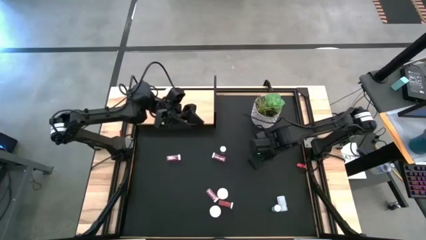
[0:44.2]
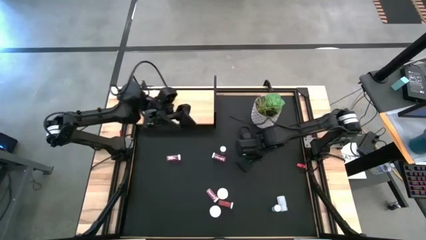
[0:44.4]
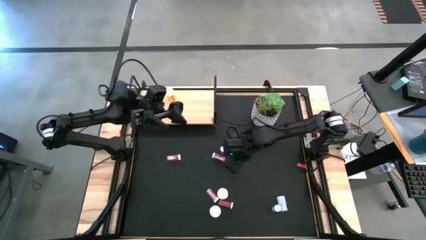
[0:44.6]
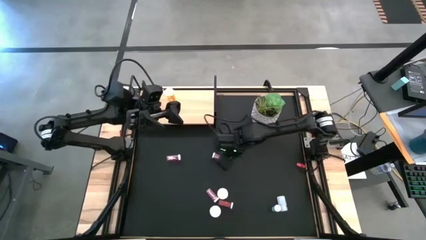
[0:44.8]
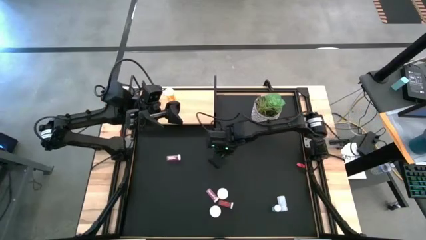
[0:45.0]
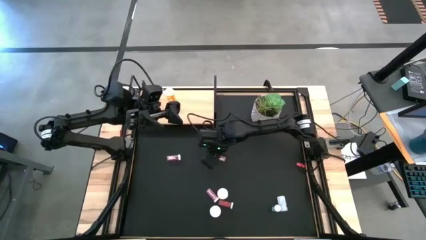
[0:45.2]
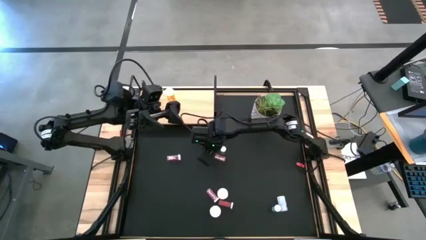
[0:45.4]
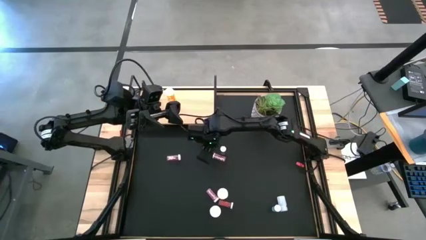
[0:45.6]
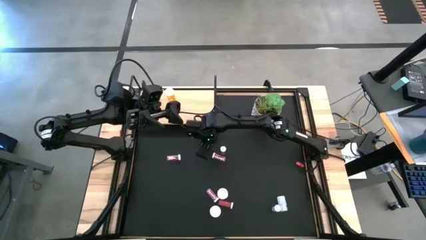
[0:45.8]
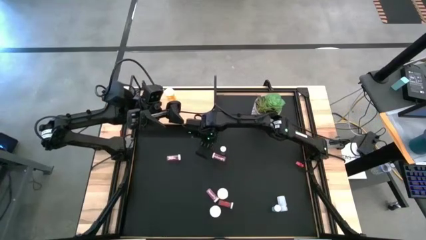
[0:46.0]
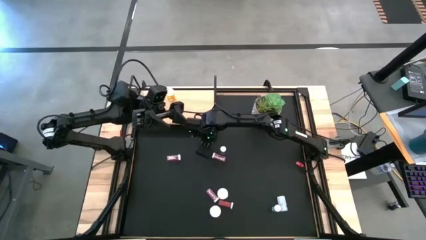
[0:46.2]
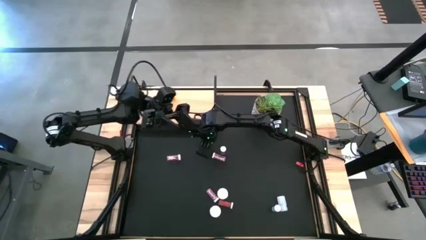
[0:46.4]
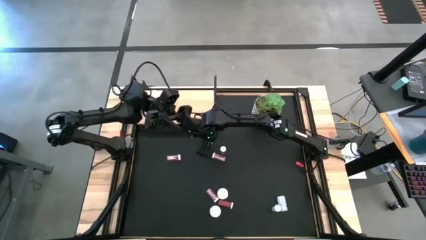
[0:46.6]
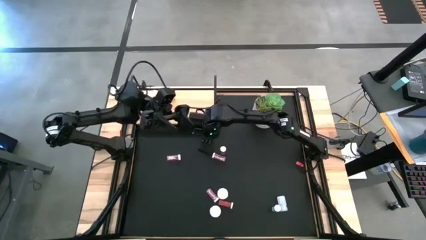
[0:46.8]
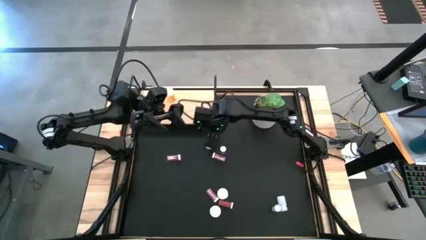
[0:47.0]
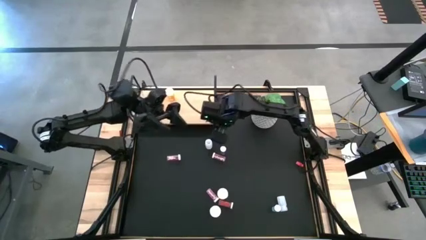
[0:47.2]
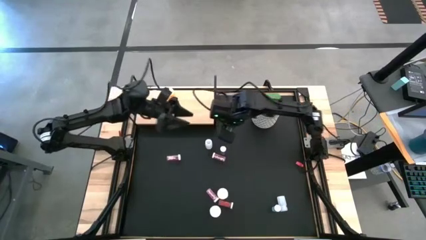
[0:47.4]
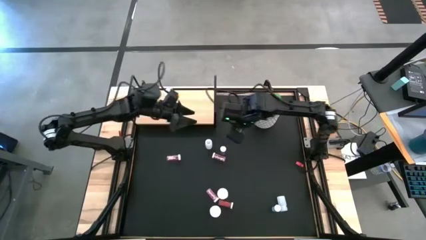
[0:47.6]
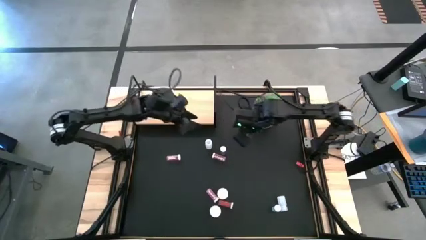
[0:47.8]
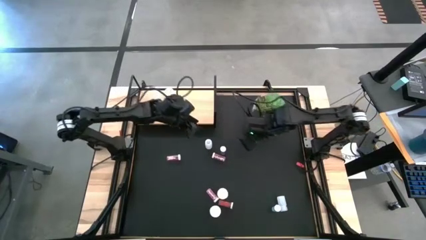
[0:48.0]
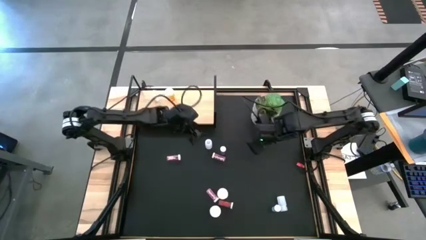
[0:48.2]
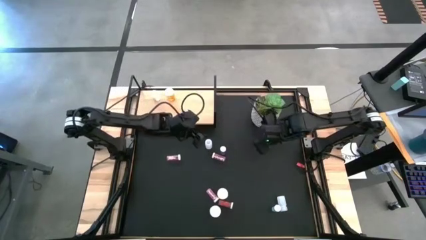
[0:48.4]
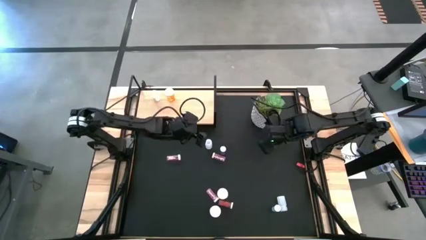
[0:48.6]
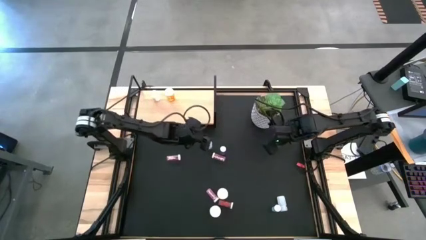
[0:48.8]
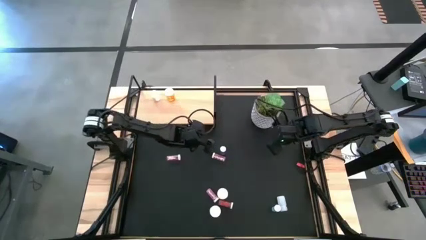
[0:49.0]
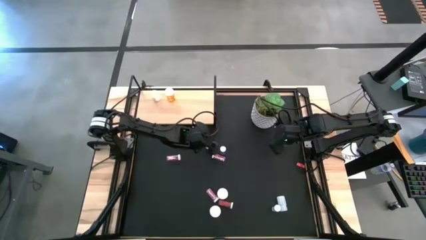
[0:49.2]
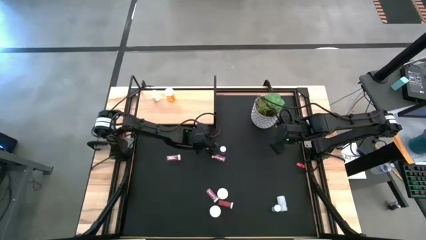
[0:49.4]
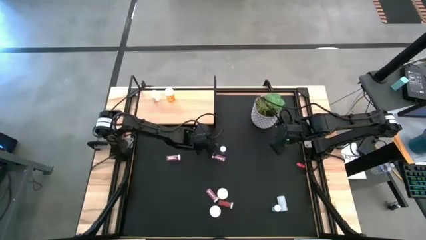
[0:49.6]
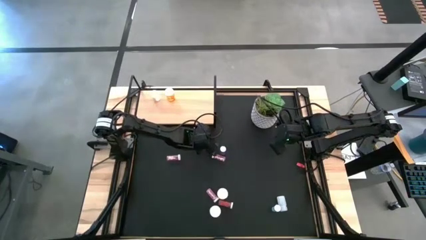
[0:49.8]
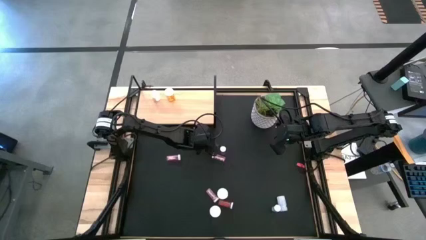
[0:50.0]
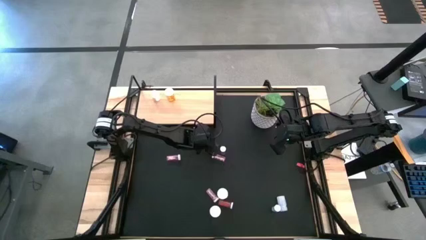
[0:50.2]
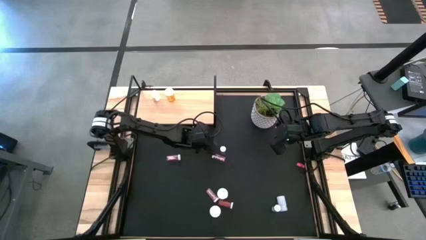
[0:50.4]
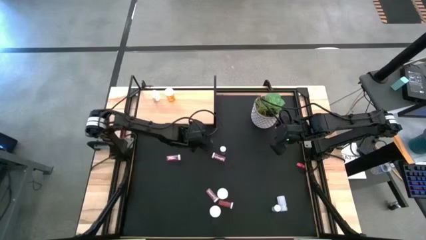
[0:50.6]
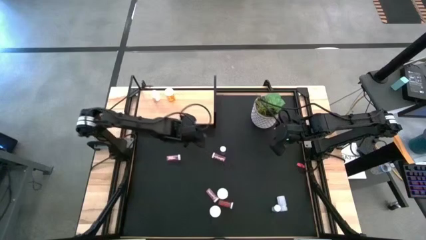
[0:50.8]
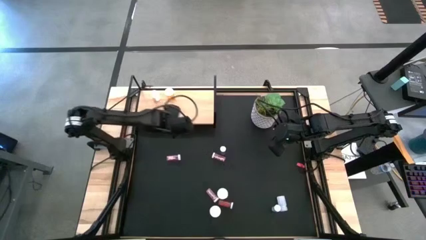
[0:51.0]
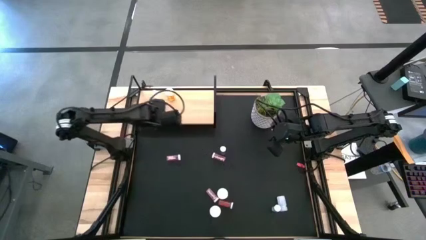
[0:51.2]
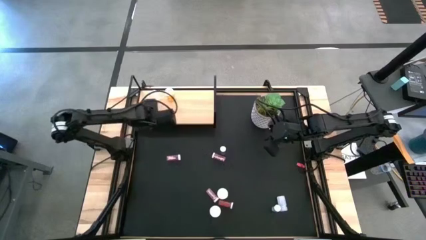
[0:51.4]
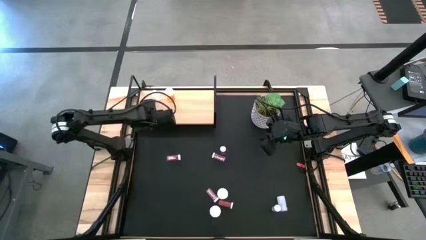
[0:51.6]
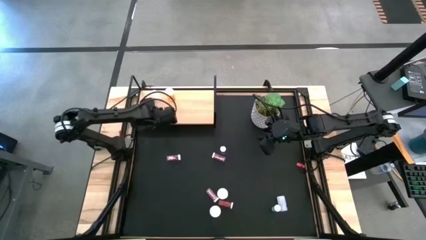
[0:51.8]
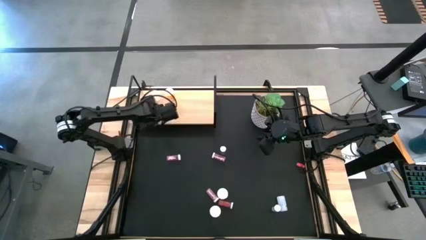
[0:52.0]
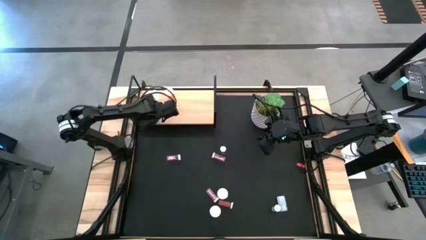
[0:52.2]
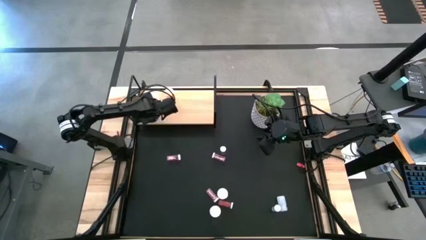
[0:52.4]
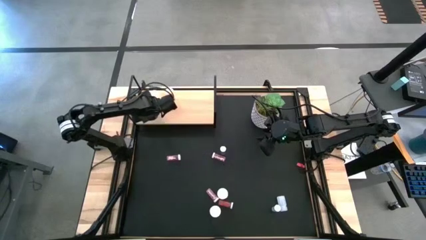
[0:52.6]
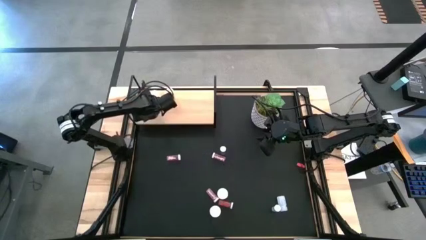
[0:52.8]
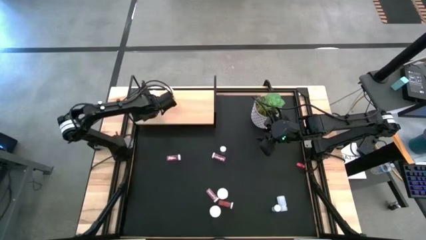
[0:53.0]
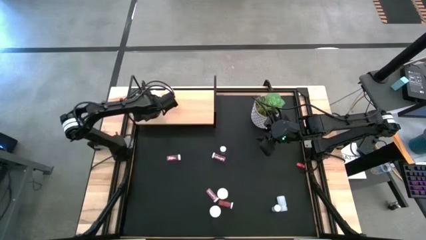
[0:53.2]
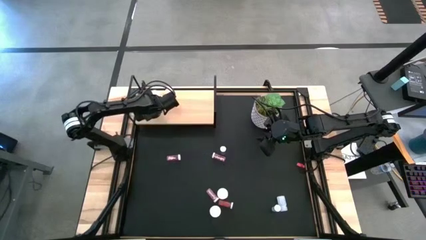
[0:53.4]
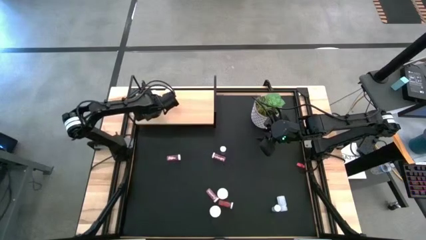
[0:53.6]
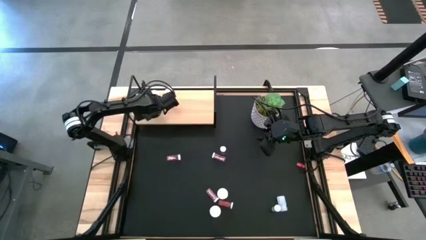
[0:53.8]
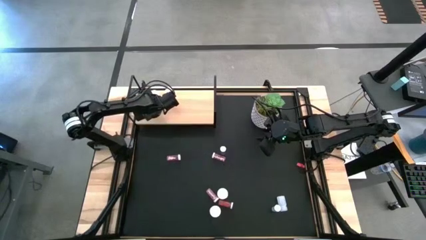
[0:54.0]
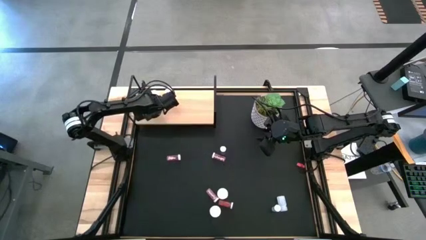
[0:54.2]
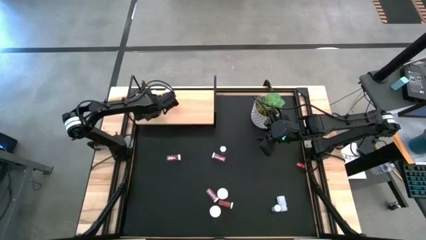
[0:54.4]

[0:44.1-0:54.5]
Task: Pick and place medicine bottles onto shelf by color
Put the top white pill bottle on the shelf aligned with the other white pill bottle

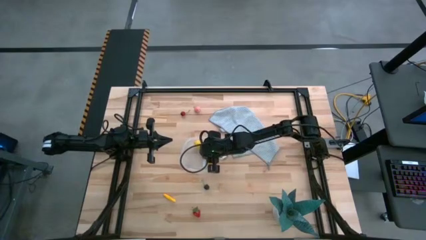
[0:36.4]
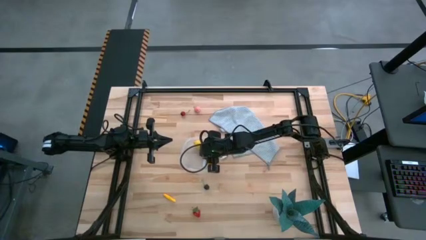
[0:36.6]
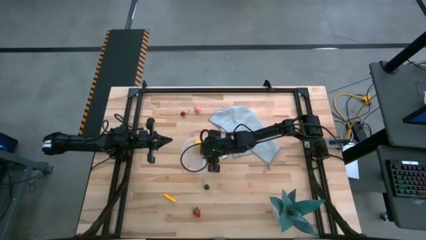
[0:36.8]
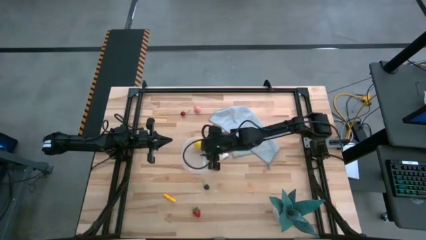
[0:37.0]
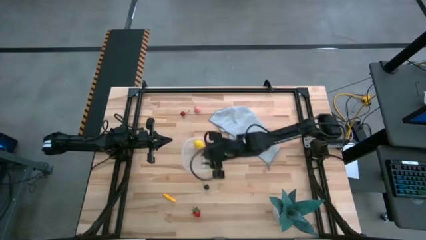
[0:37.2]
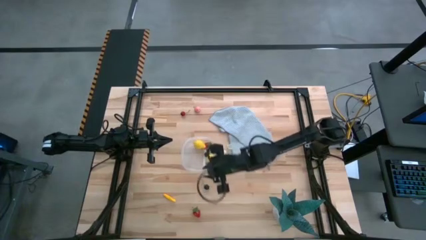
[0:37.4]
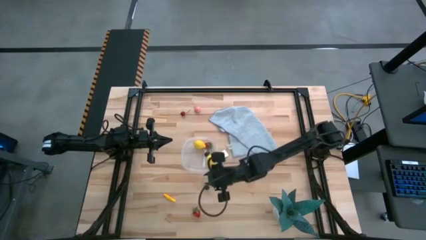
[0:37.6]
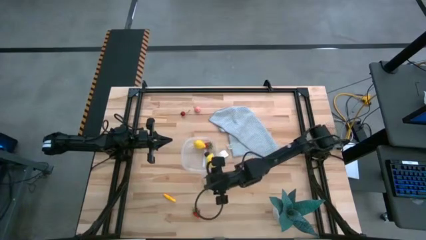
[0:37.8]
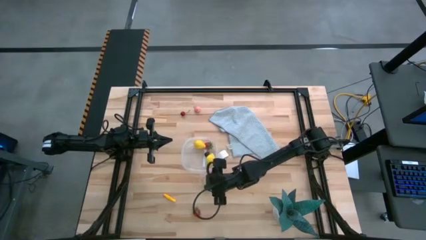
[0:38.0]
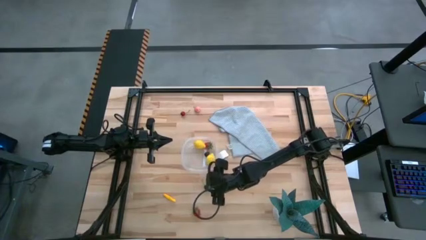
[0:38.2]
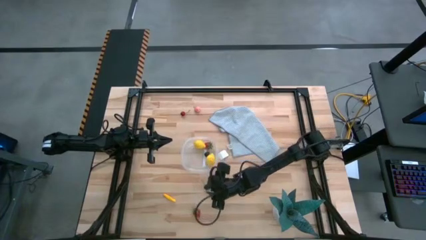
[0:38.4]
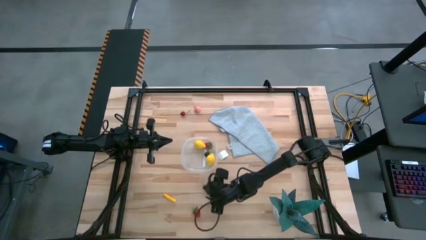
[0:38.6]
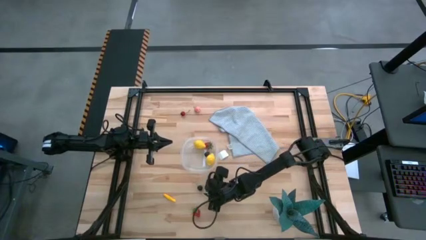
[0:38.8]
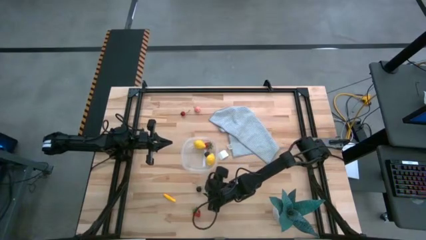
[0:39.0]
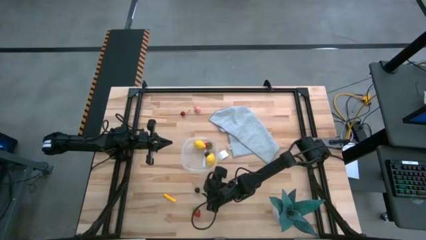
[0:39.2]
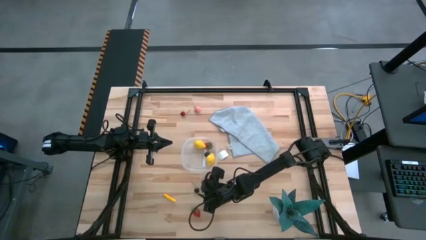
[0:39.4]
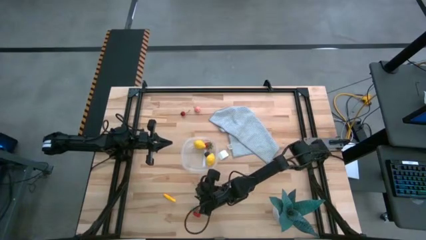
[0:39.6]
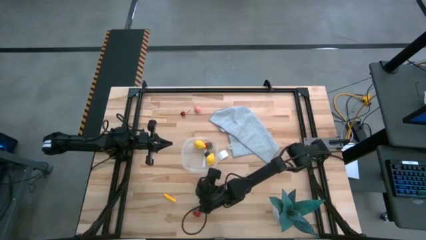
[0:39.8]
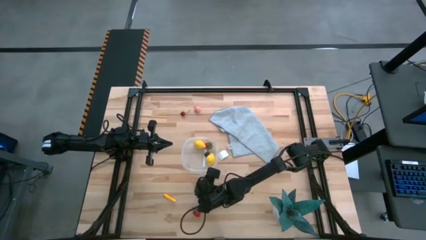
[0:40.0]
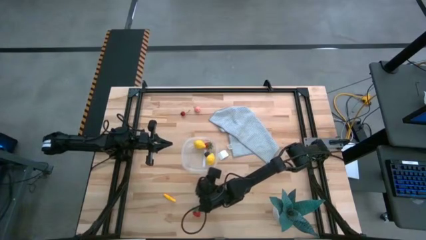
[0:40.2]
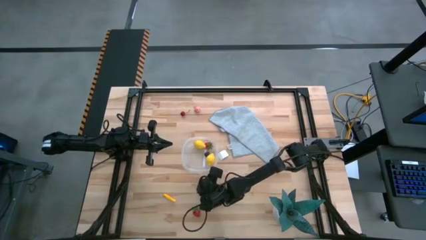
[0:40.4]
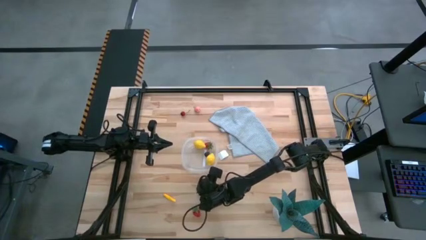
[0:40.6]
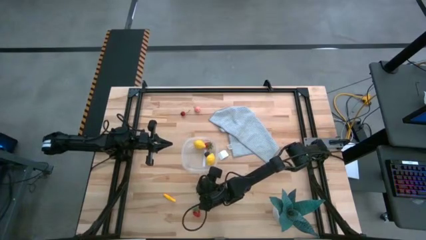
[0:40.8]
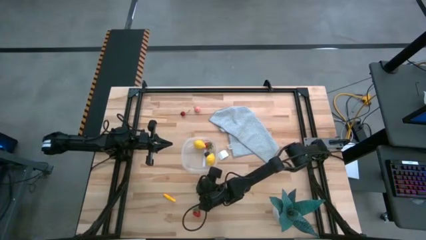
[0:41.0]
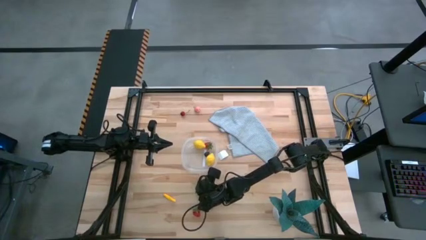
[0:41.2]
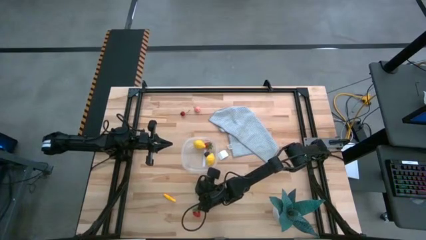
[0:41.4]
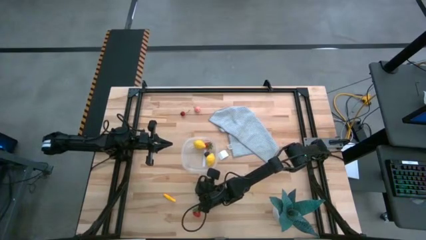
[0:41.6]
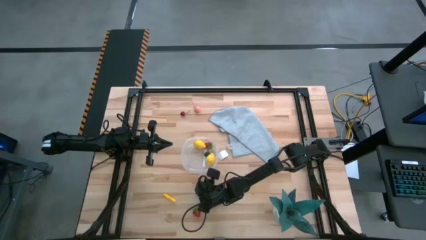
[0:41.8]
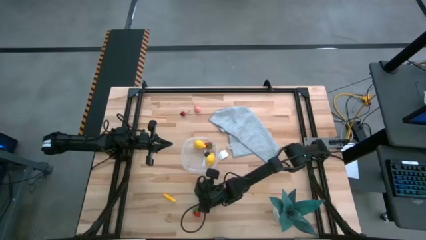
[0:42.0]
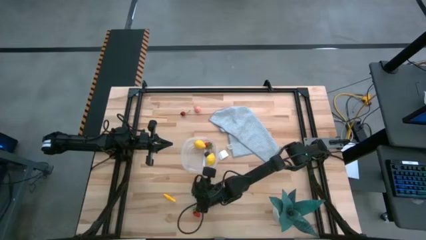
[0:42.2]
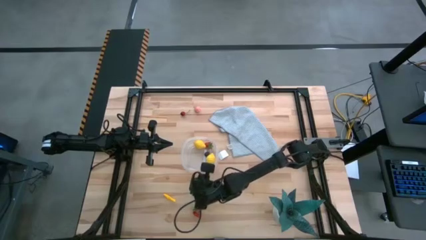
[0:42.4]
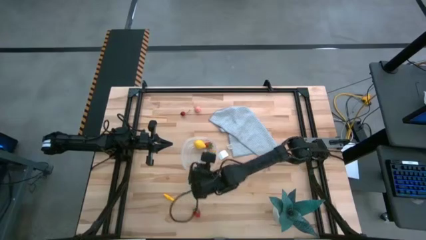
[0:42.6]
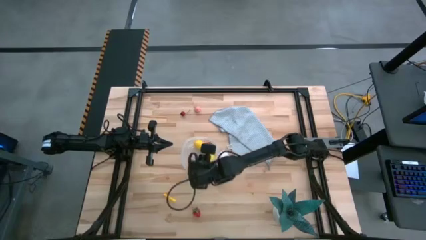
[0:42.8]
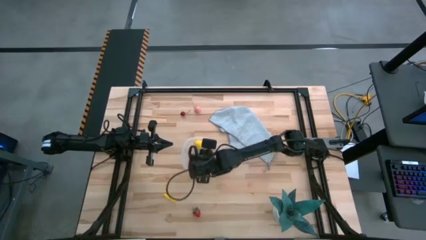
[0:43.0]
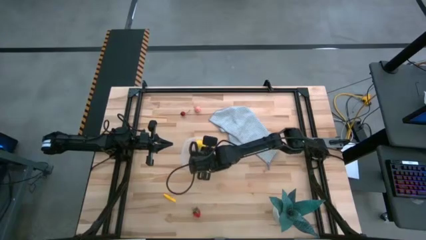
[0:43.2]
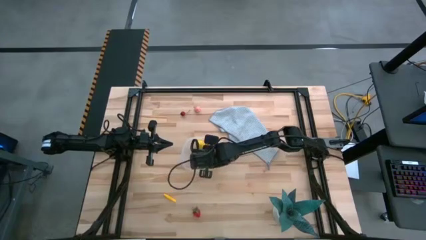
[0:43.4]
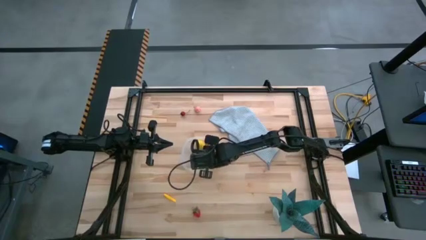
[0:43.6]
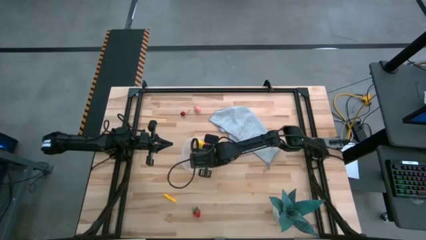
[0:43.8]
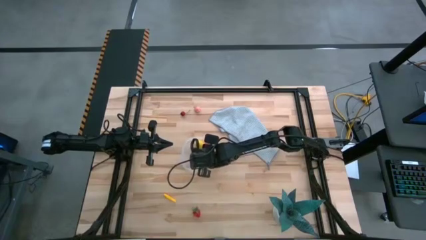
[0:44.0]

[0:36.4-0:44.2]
Task: Pick and placing Produce into tupperware
Put the black cherry into the transparent bin
